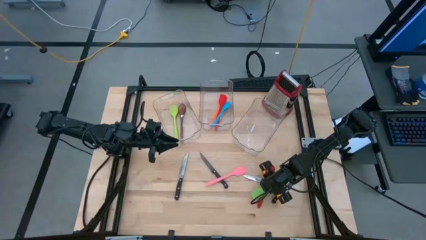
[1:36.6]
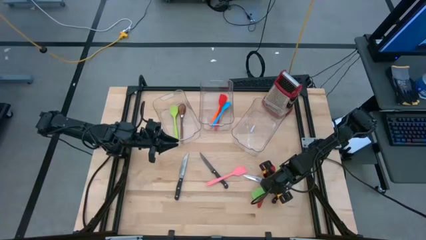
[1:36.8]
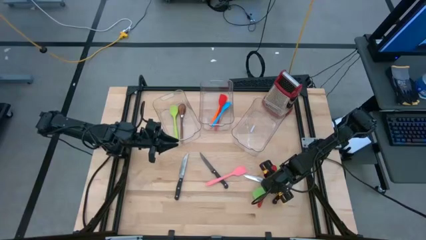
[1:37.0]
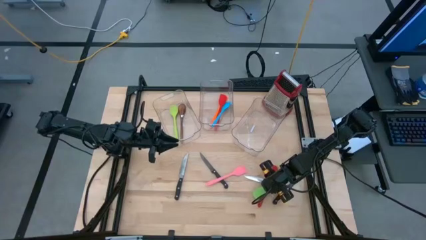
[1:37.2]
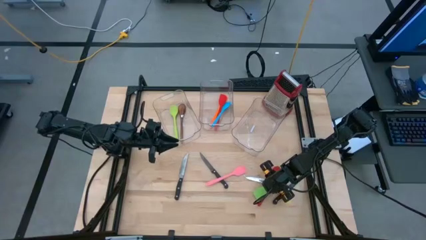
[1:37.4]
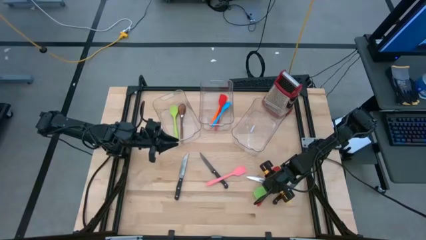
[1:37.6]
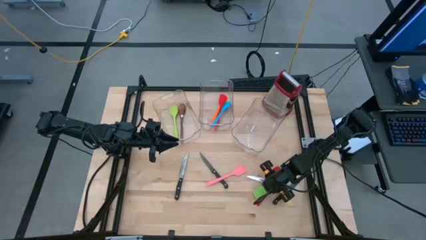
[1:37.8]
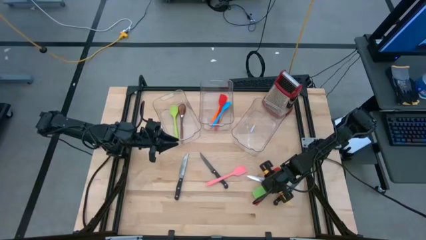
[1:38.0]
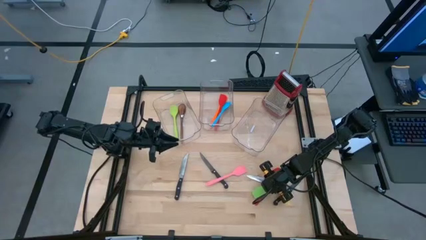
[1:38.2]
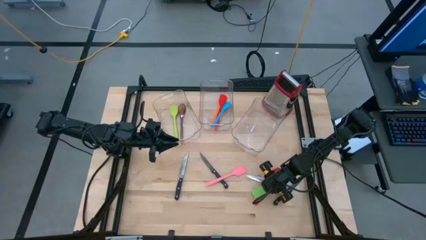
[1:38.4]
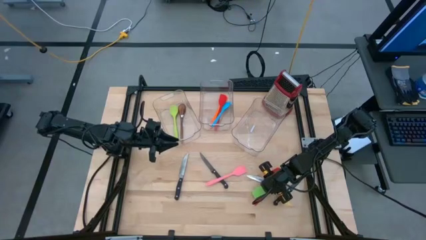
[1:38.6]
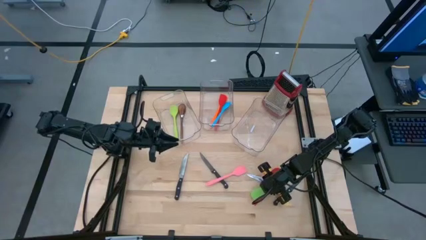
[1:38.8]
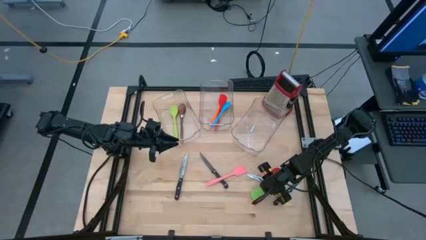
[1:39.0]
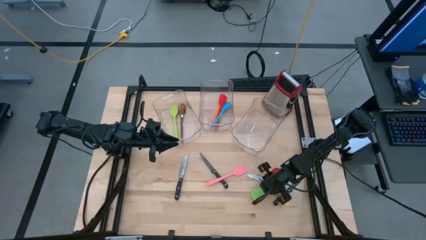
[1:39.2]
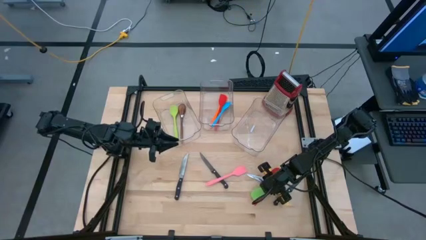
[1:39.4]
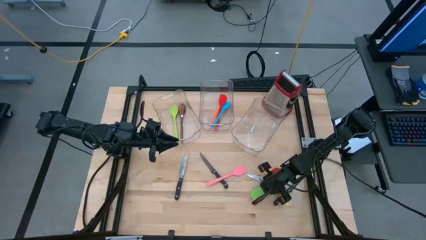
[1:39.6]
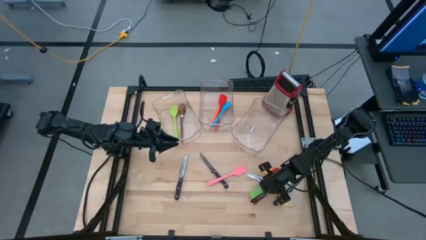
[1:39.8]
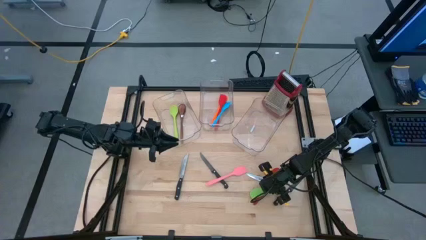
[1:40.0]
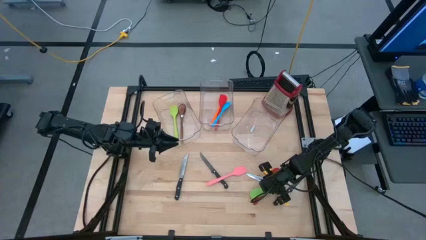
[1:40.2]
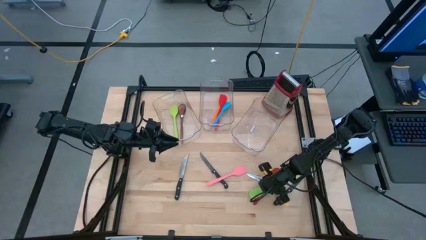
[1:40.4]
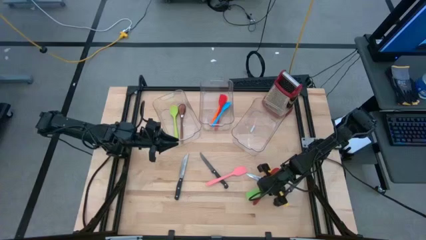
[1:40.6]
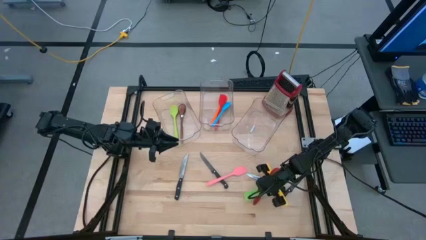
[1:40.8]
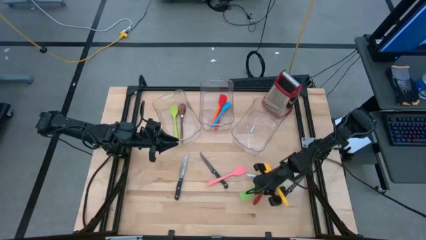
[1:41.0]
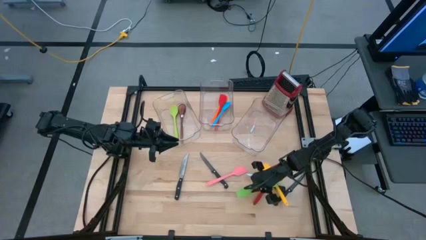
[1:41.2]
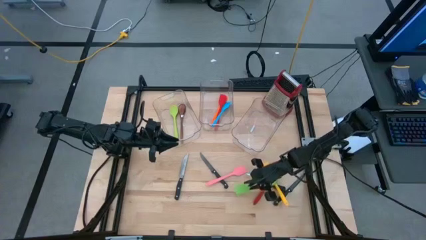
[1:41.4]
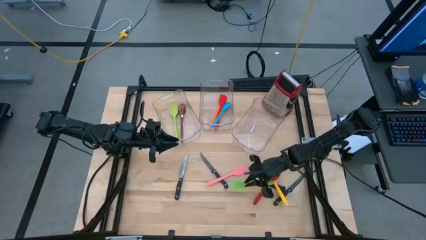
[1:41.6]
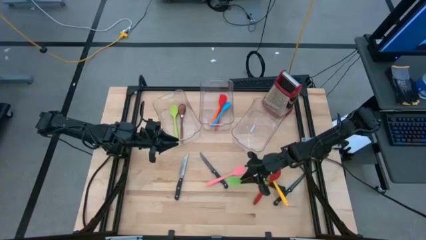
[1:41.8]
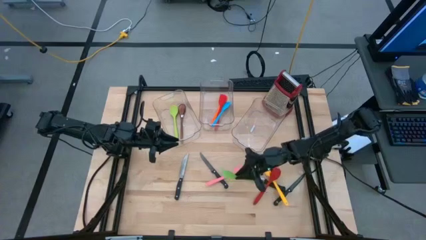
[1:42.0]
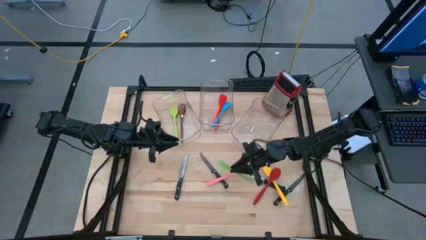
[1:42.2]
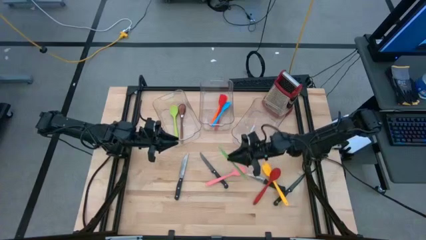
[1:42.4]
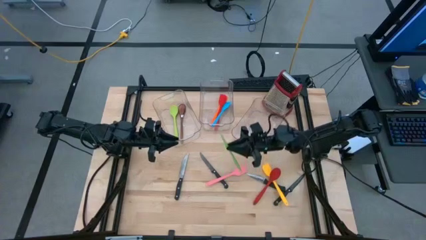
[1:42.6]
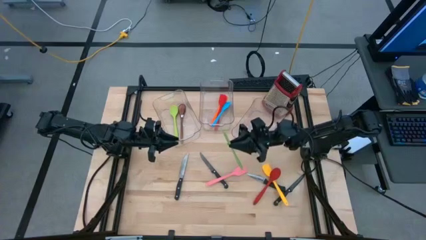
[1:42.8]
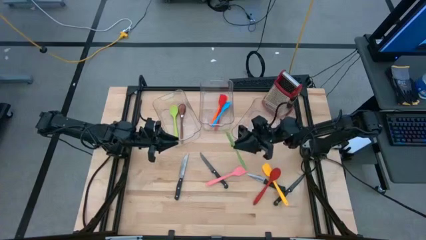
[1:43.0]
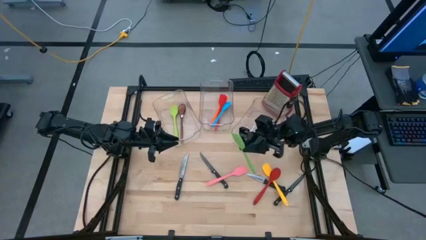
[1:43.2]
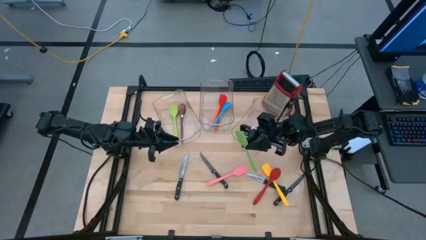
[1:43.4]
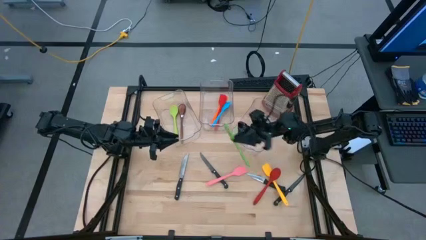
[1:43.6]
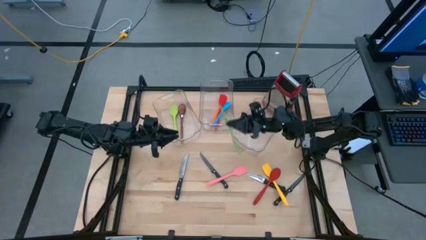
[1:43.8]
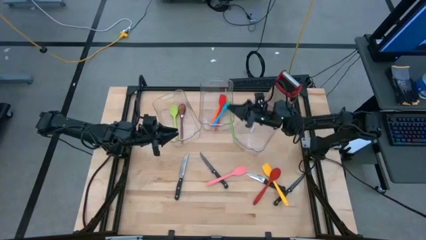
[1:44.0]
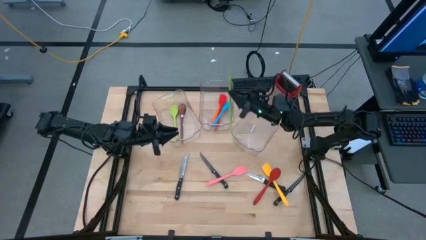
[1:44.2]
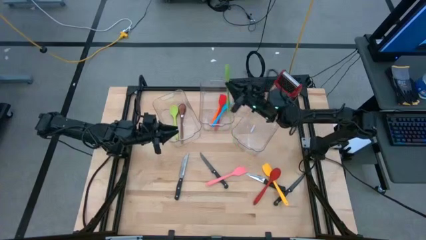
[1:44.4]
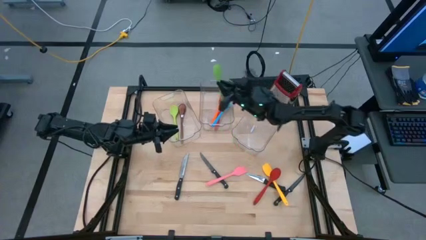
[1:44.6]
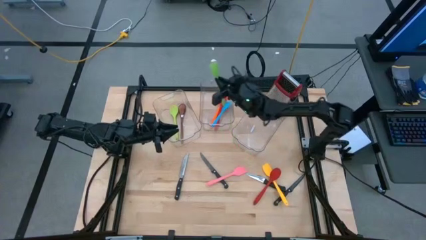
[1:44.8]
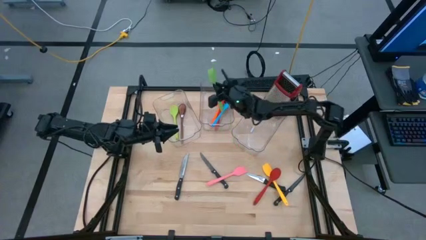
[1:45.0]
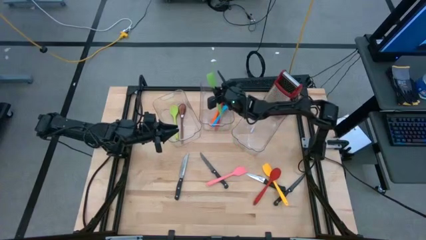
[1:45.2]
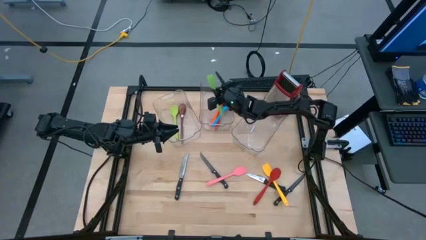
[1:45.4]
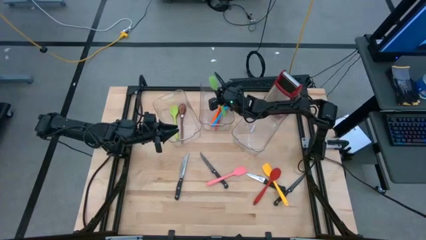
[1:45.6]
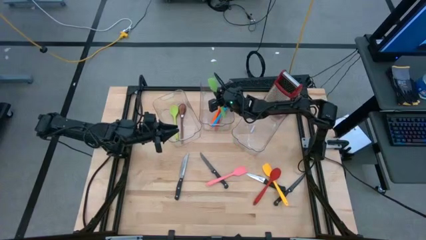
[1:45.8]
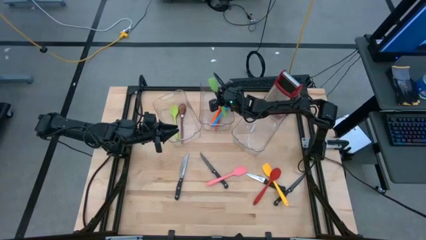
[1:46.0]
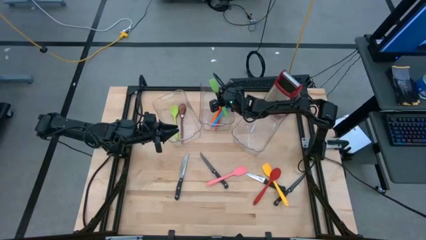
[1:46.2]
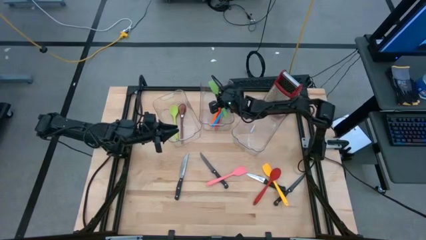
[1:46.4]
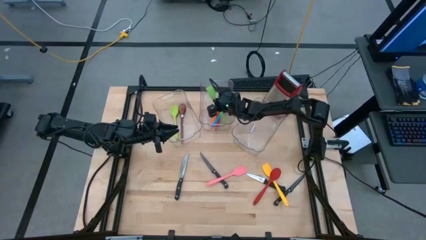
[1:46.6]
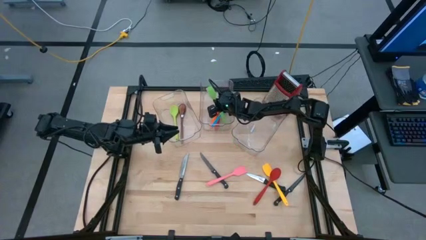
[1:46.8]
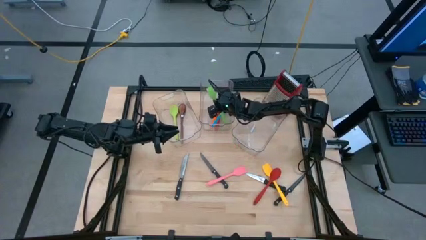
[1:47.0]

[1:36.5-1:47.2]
Task: Pick & Place Kitchen Items
Put the green spatula in the middle bin

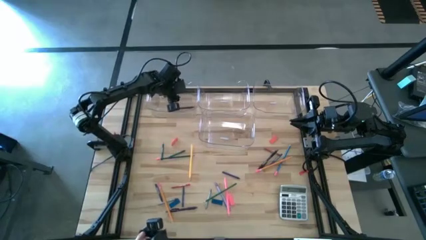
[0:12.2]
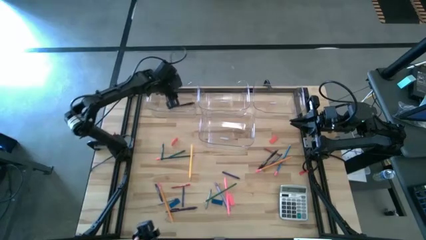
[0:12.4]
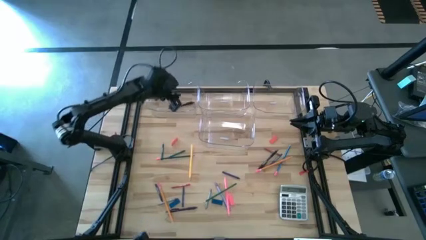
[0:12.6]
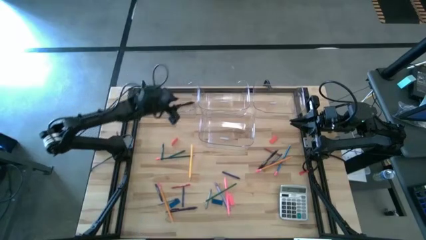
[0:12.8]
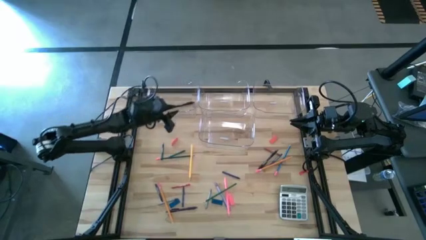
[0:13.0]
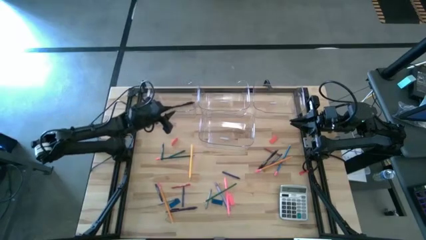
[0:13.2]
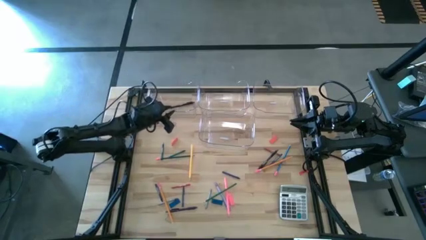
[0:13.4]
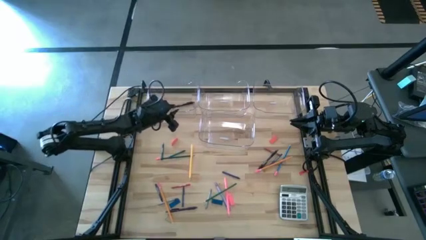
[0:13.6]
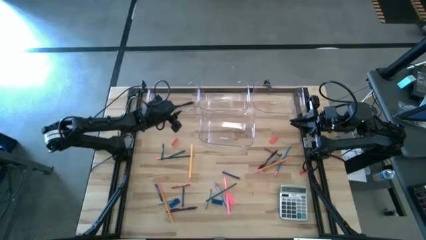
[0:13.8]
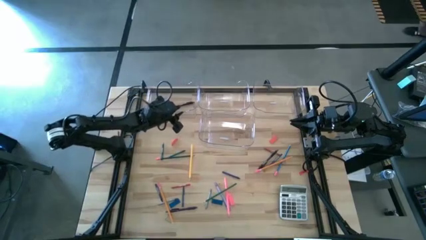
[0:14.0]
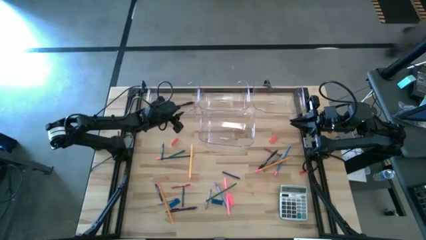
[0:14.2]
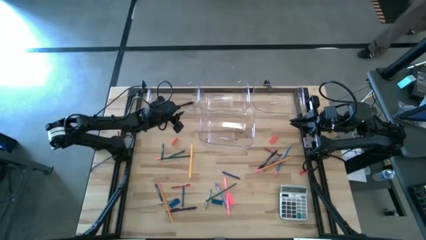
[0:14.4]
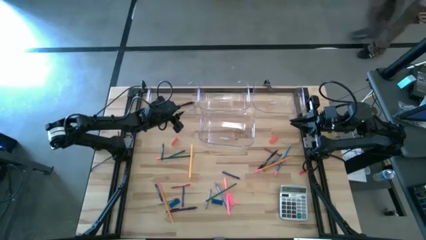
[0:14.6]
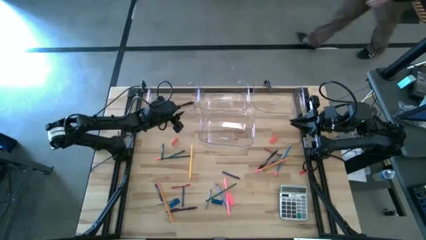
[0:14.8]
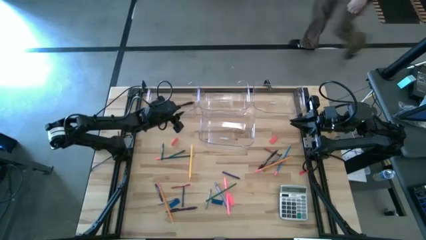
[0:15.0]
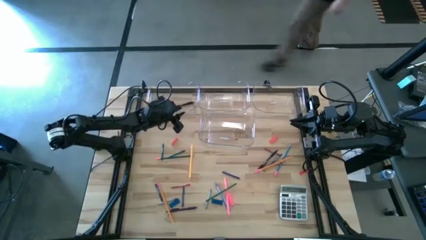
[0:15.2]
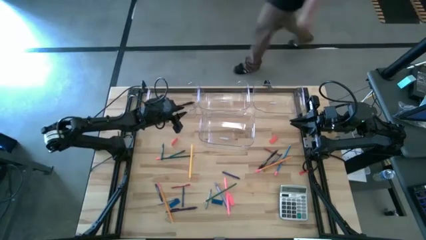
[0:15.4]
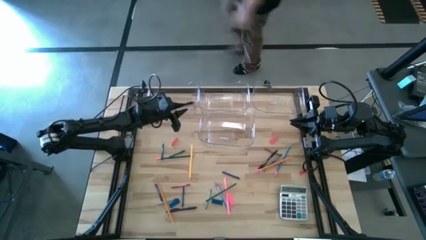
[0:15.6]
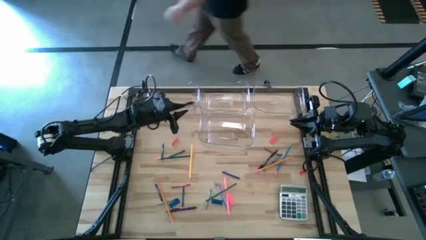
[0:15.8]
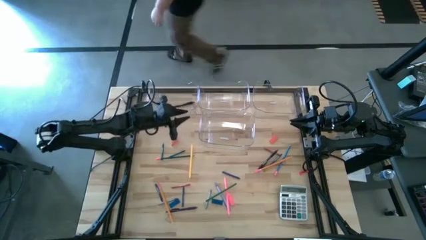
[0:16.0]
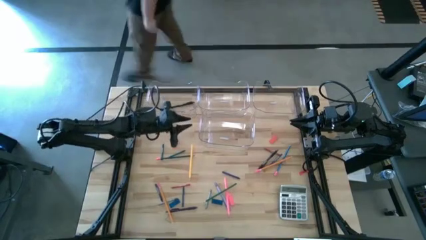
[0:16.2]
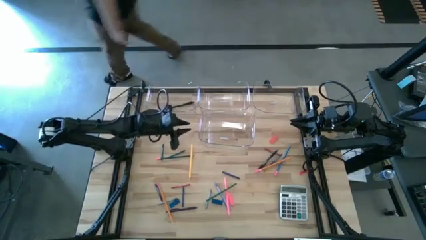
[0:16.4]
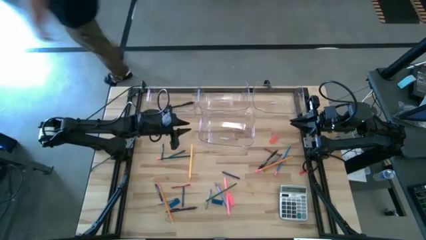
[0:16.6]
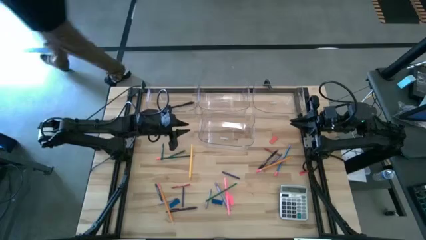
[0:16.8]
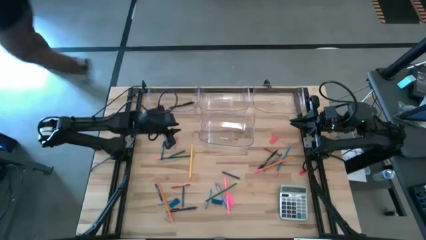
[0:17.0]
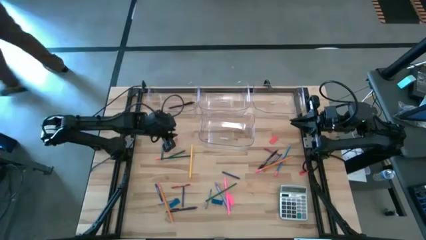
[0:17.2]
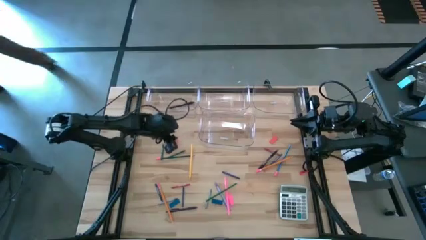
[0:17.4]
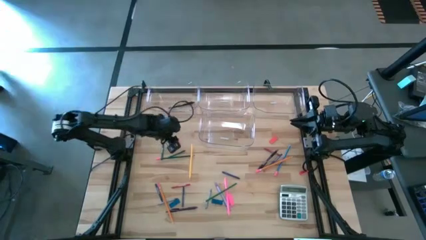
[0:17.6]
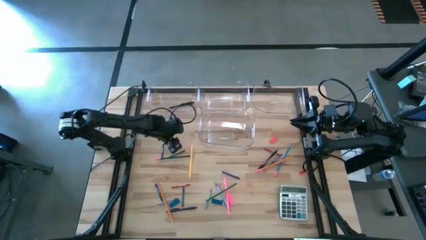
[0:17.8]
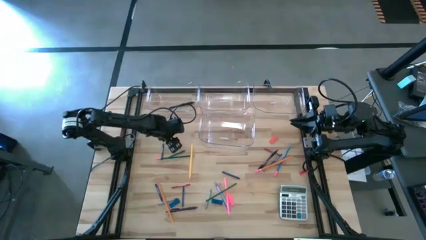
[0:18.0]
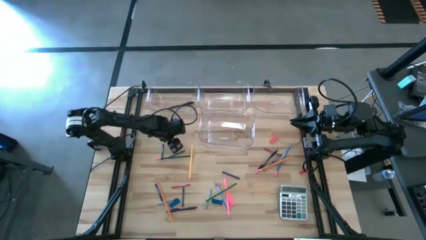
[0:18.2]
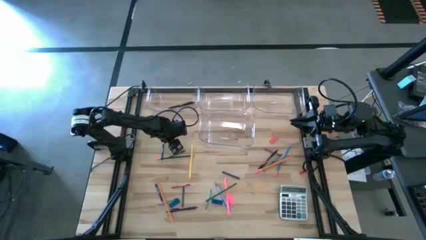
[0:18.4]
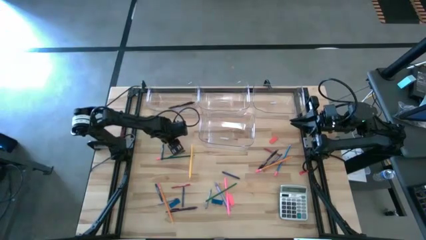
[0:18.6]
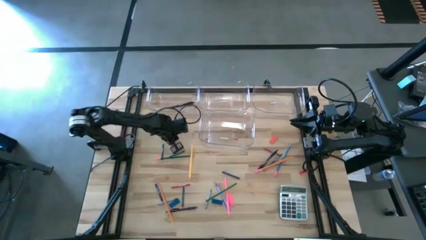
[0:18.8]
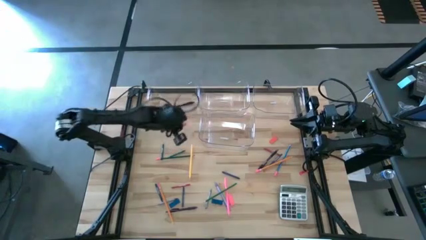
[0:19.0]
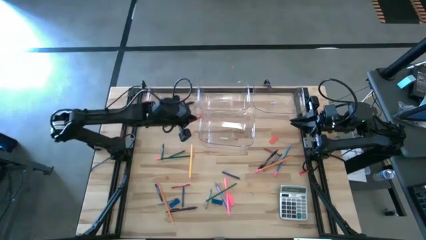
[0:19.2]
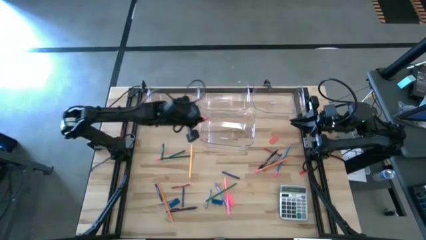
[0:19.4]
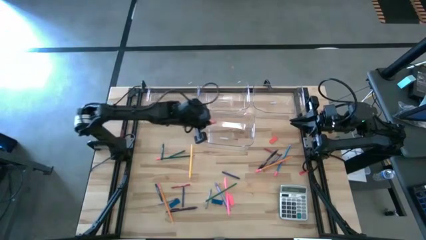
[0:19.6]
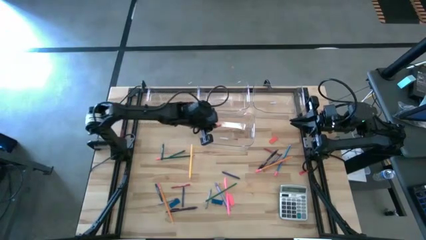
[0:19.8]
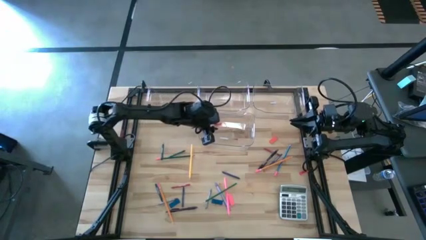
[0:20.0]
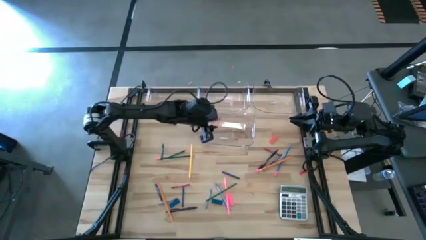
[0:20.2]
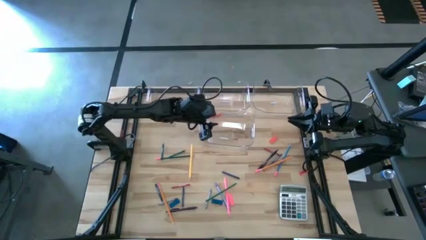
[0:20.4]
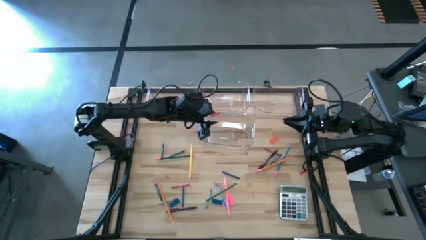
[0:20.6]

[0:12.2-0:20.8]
Task: Sort crayons/erasers/pens/pencils in bins
Put the orange eraser into the bottom transparent bin
